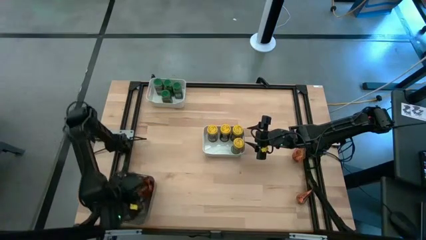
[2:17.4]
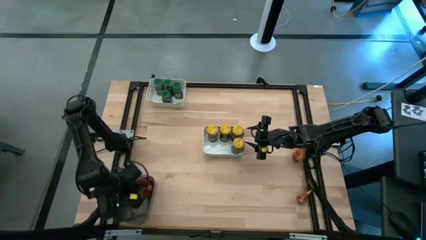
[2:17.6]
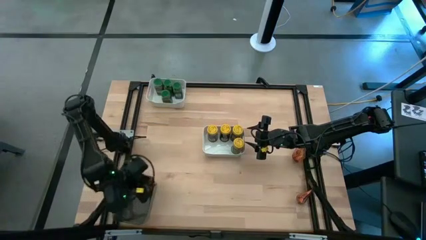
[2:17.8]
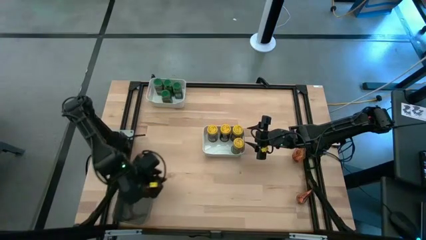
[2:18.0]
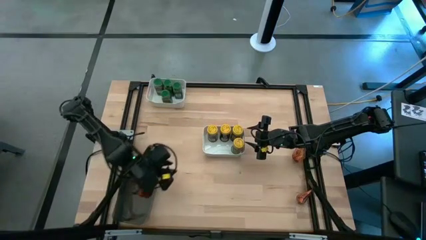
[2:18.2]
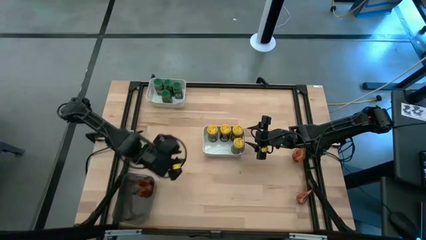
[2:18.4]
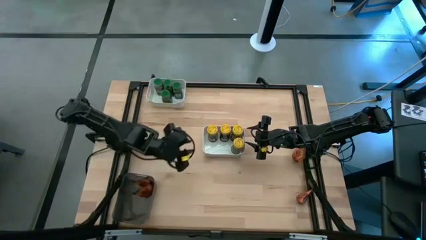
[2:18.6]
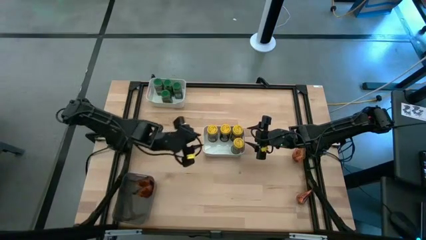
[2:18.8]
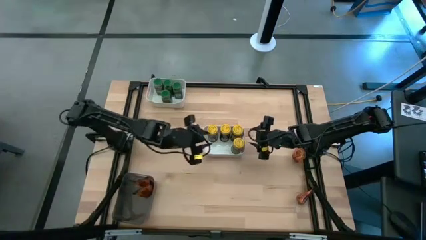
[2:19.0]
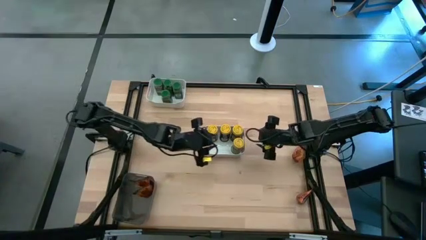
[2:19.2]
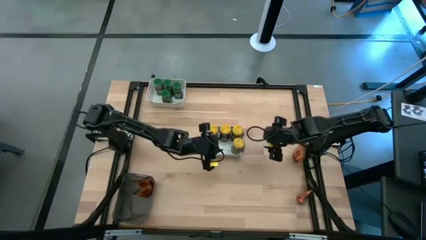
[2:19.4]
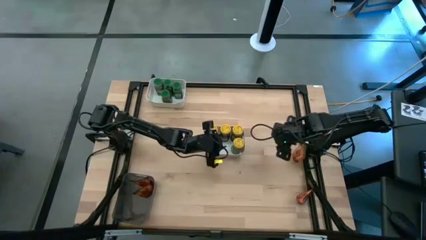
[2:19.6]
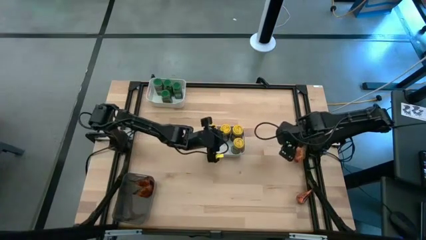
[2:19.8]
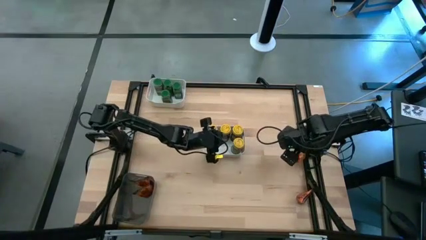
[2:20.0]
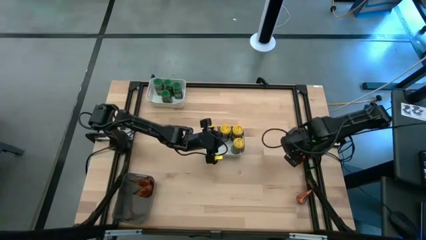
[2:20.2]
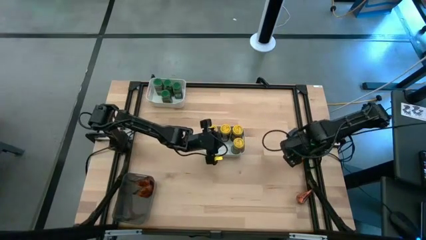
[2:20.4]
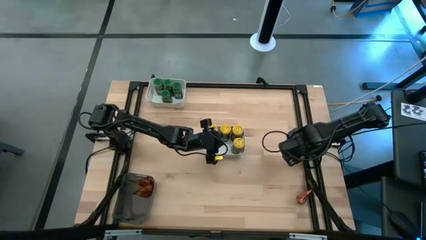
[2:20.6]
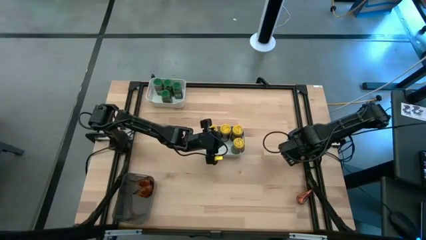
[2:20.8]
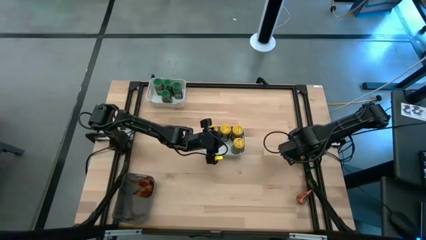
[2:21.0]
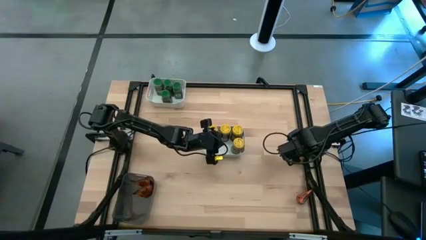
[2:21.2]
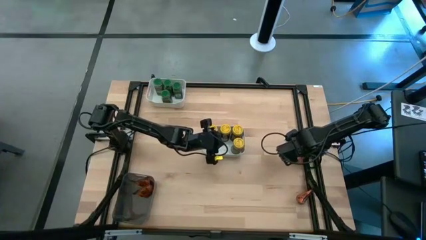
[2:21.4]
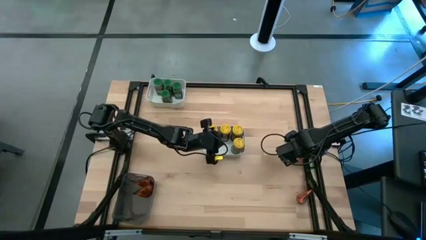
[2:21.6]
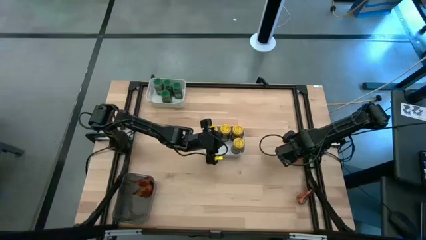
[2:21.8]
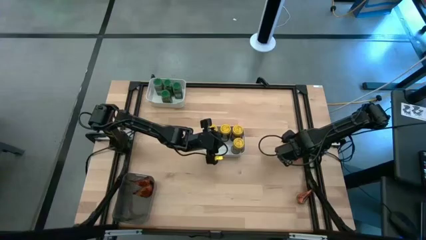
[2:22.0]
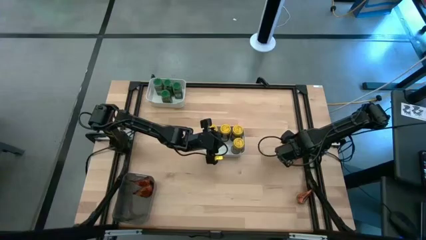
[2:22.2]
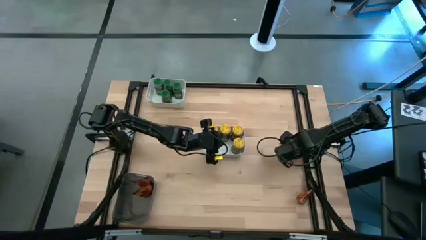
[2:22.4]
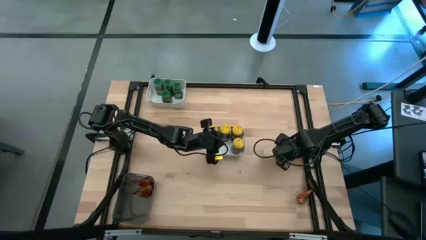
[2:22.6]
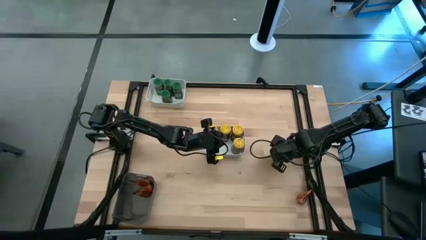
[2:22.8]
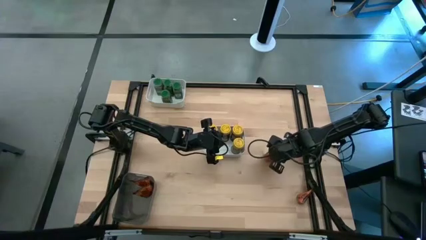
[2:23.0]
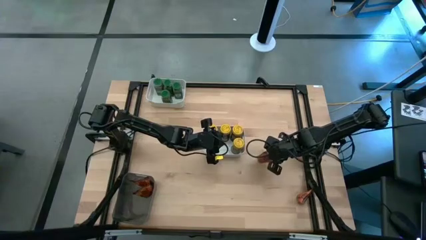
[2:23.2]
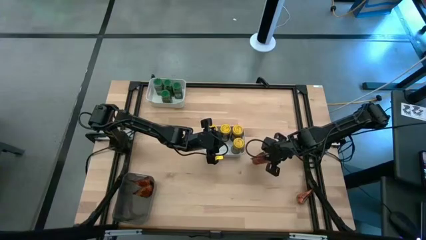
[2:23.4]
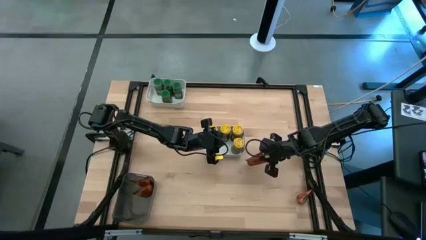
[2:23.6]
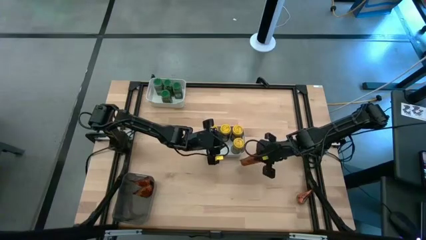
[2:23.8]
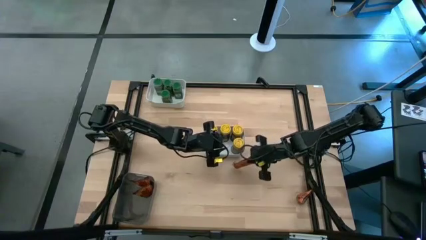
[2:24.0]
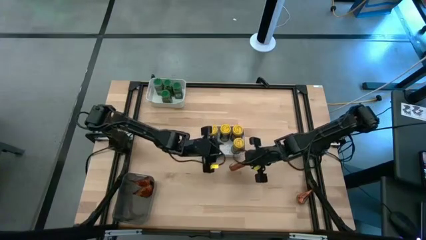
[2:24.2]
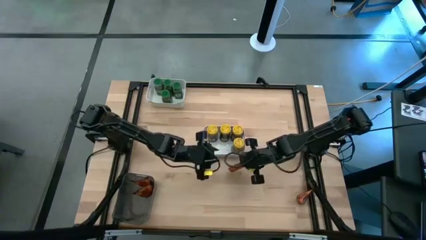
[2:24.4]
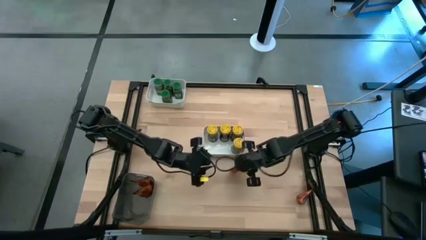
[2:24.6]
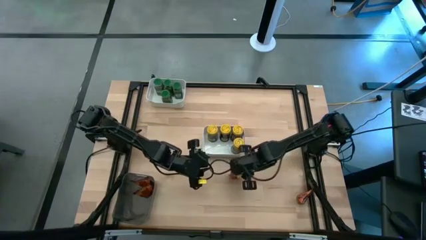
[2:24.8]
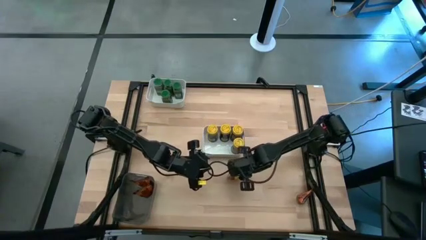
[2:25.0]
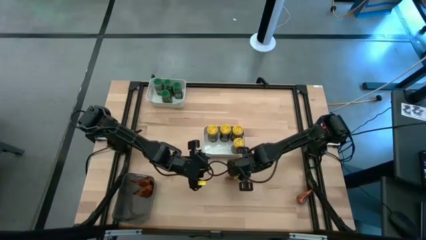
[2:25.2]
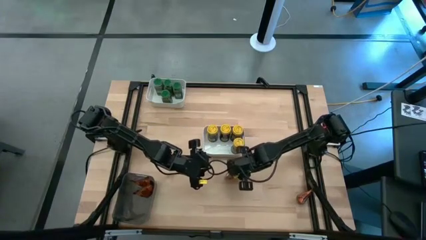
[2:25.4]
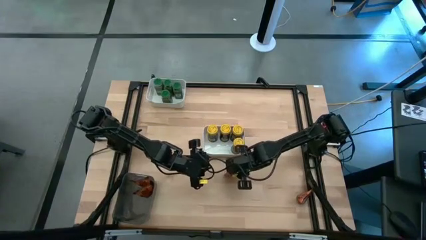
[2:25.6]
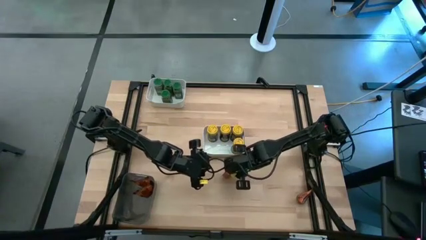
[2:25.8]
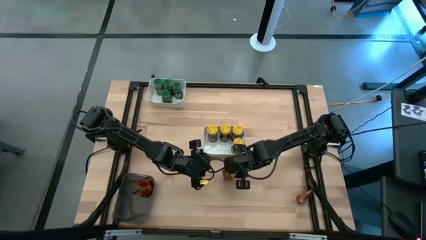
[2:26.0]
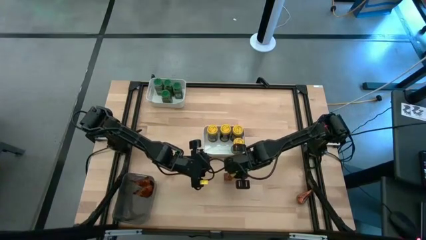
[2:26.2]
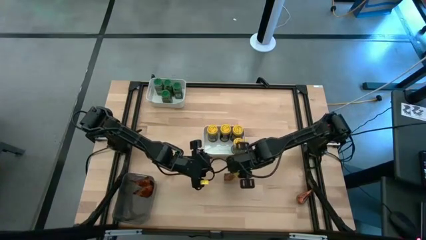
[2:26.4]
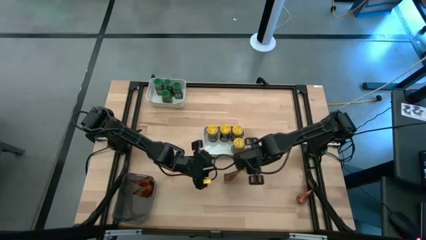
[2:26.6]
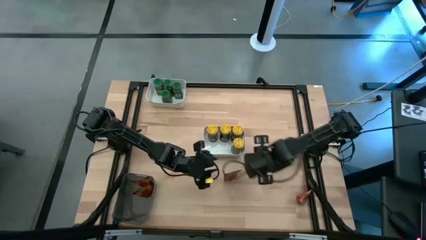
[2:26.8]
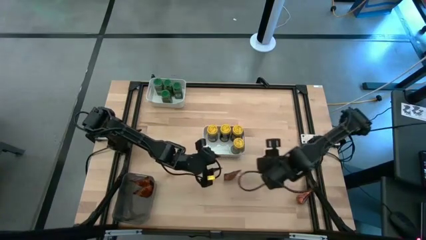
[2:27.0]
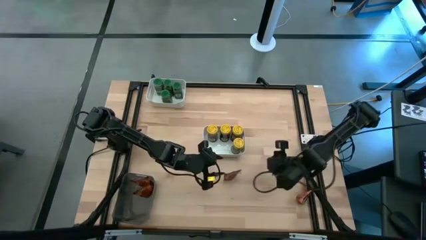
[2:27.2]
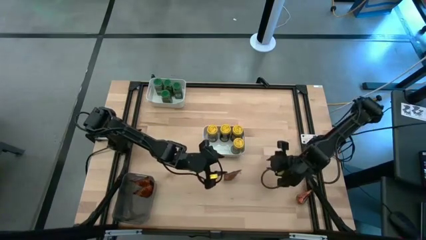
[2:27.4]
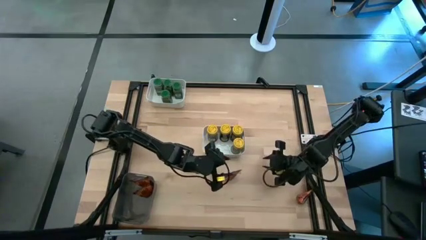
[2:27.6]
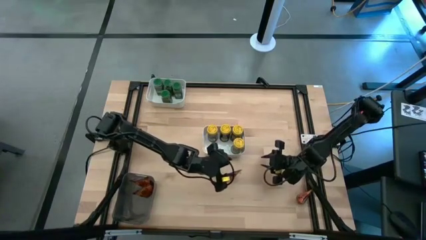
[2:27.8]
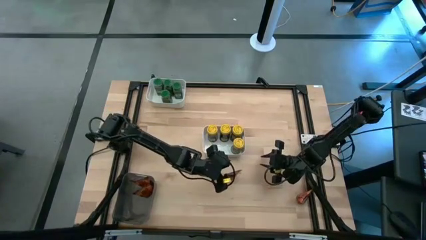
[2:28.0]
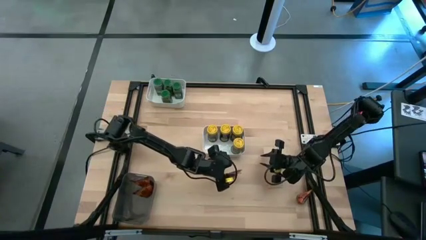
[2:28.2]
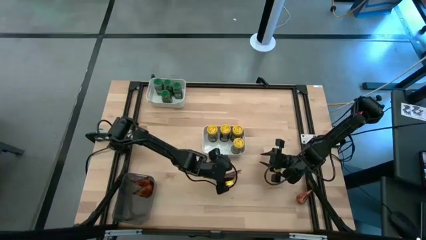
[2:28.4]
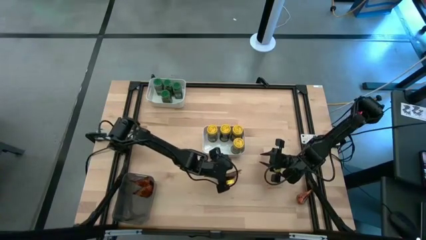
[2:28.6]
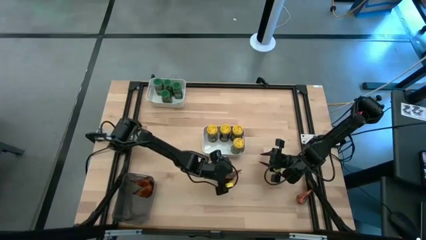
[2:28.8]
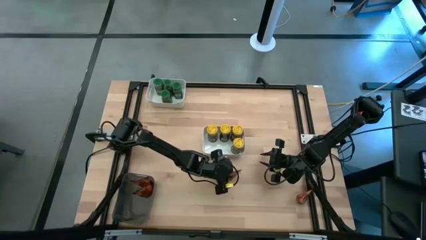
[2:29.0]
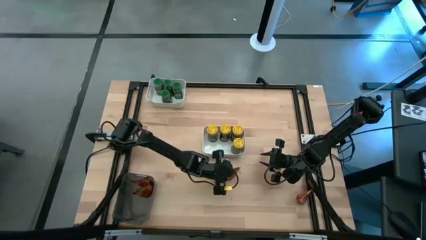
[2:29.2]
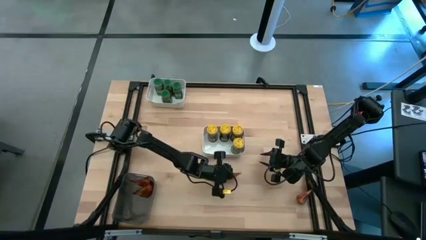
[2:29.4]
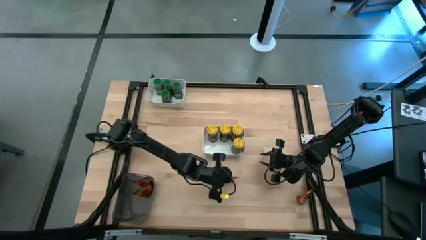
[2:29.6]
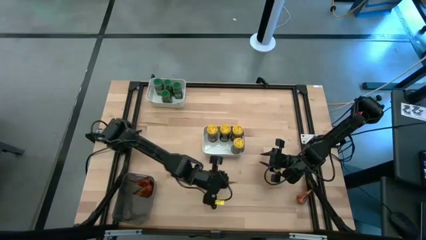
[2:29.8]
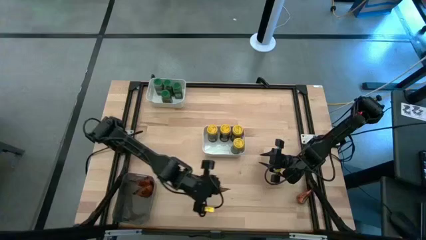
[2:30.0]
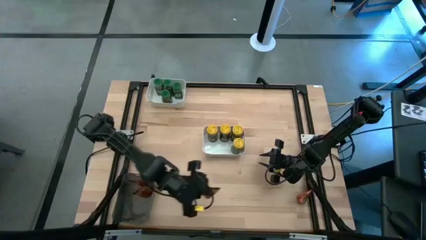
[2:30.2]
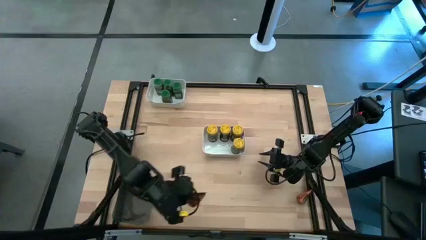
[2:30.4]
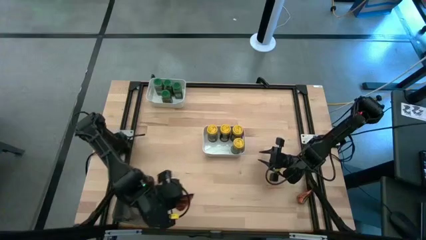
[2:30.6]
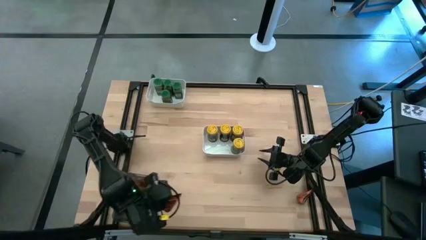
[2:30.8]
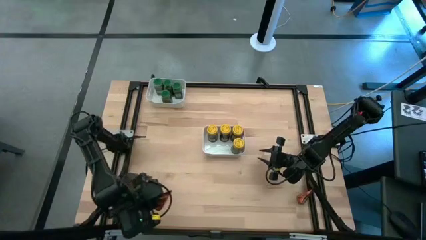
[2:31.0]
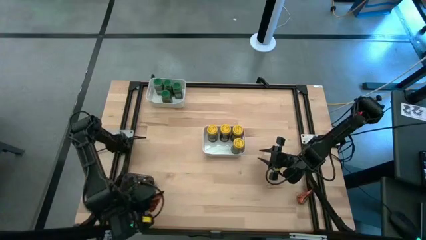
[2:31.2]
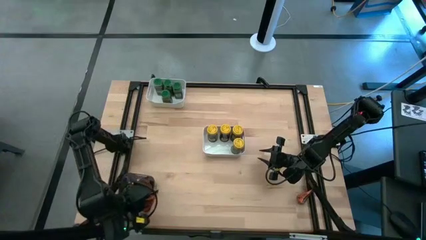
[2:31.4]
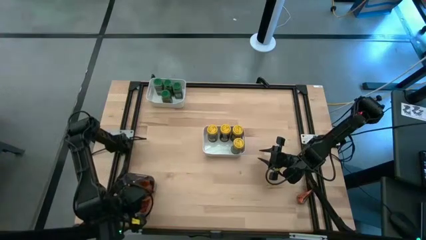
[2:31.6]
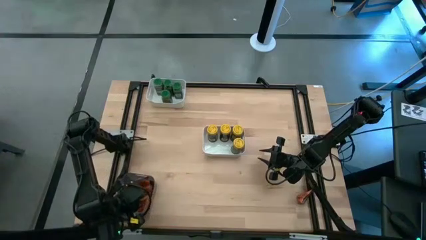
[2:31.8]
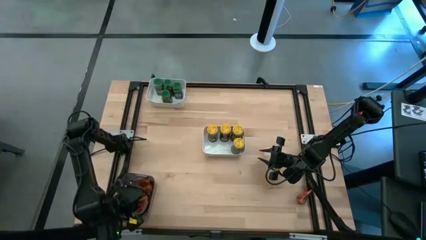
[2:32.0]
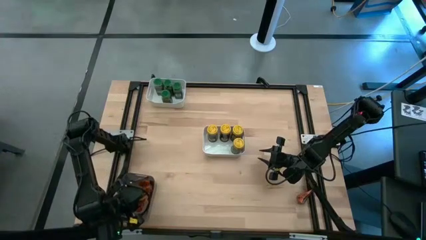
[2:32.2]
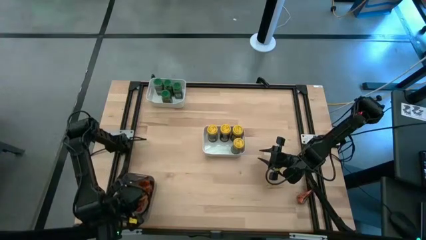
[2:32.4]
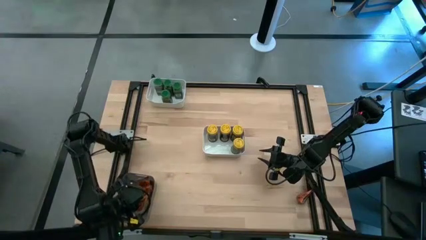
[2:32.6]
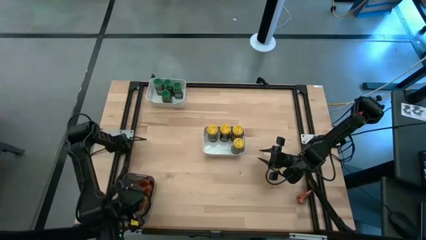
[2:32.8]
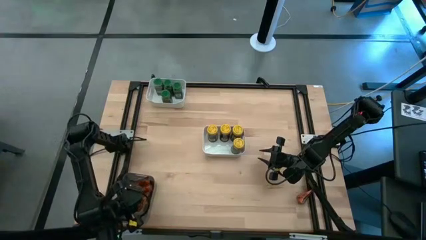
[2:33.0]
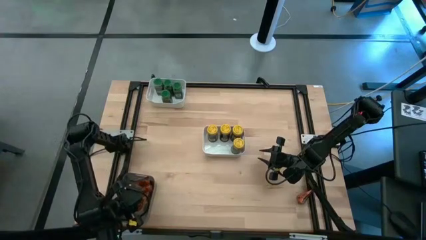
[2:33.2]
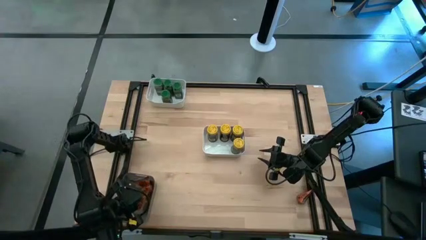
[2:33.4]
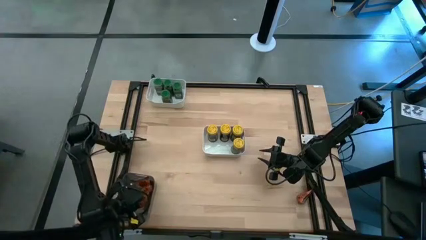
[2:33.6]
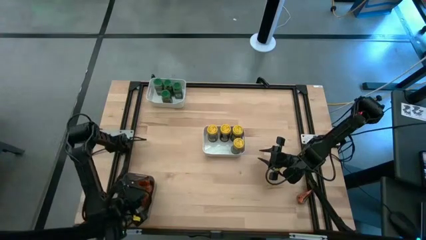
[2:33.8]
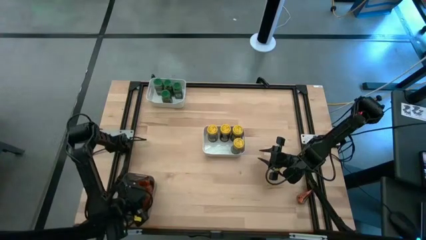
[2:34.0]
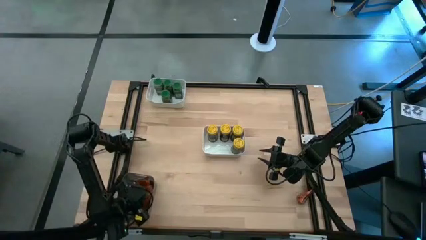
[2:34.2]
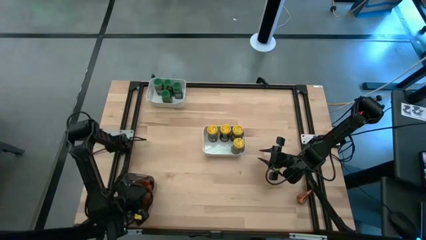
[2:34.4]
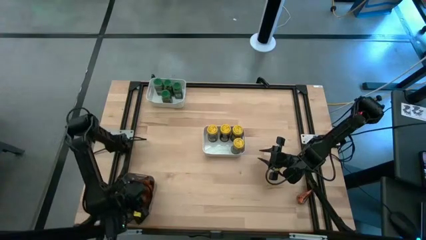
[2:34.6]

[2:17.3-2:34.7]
Task: Sort spices by type
Put the orange seasoning pack into the black bin
